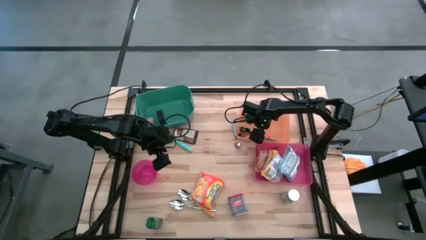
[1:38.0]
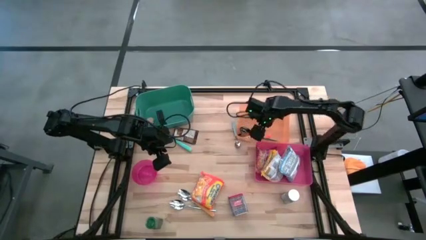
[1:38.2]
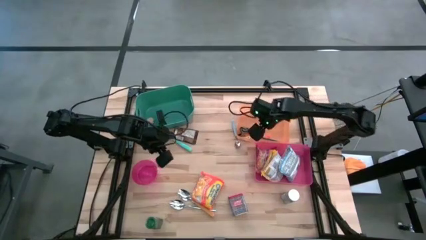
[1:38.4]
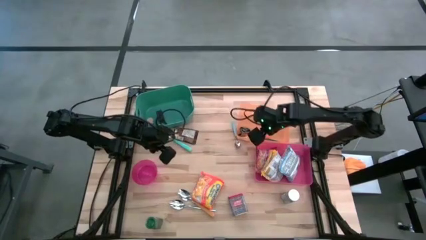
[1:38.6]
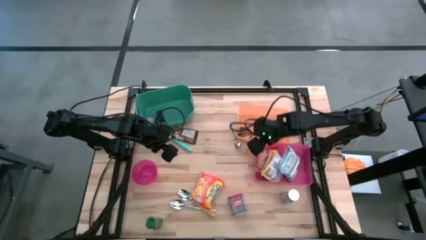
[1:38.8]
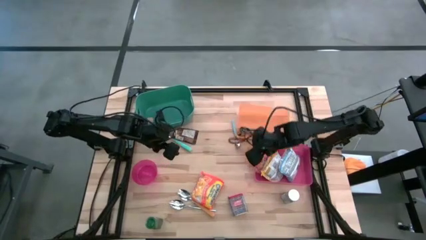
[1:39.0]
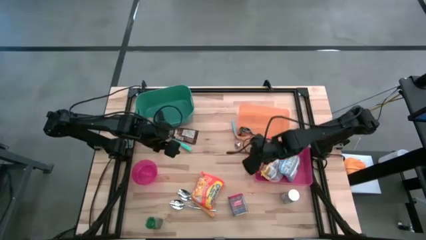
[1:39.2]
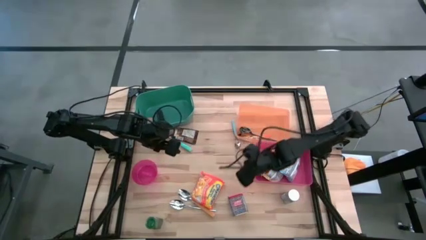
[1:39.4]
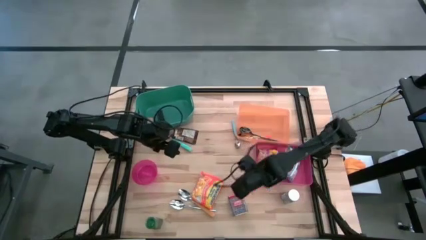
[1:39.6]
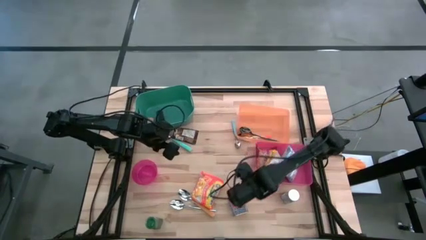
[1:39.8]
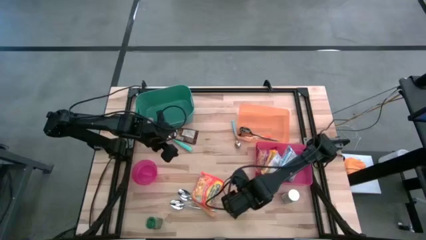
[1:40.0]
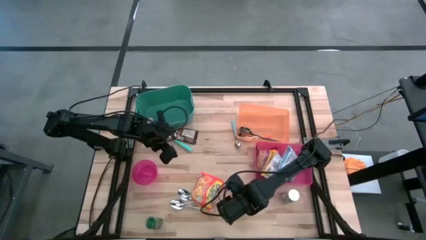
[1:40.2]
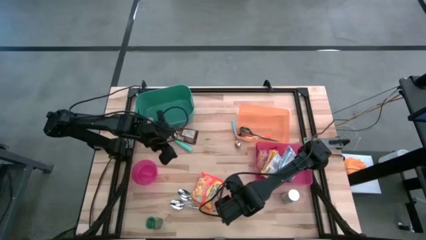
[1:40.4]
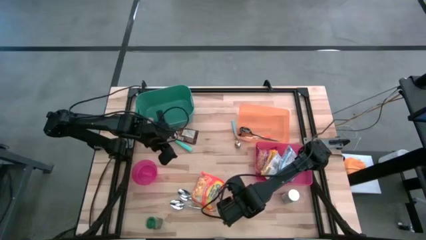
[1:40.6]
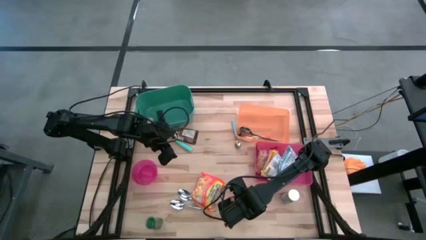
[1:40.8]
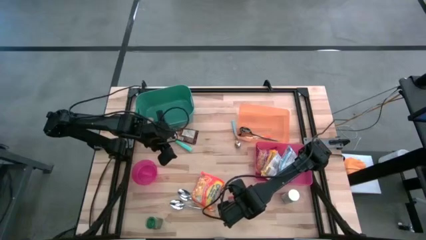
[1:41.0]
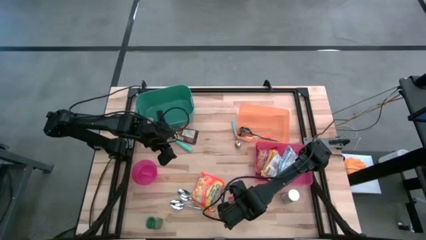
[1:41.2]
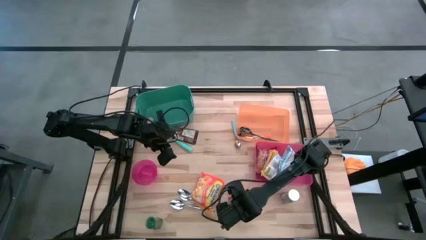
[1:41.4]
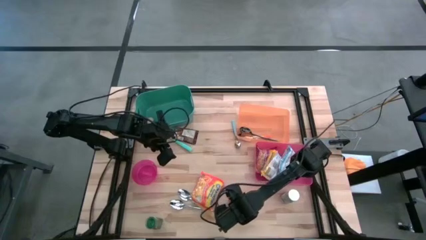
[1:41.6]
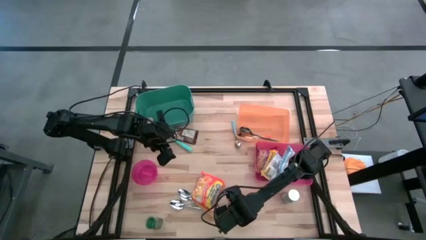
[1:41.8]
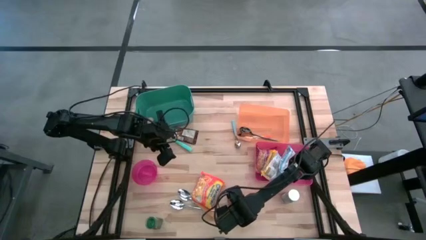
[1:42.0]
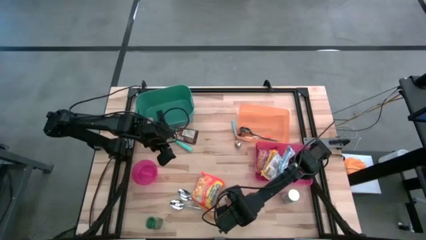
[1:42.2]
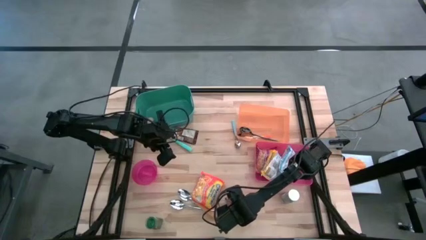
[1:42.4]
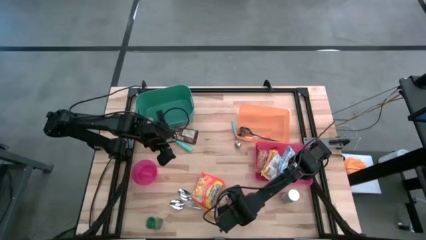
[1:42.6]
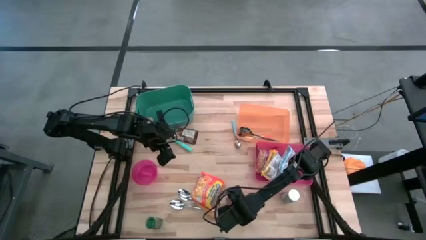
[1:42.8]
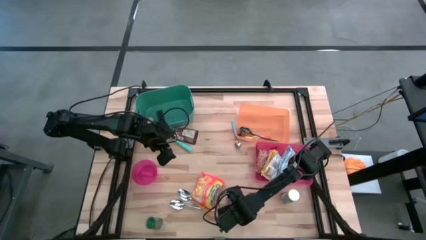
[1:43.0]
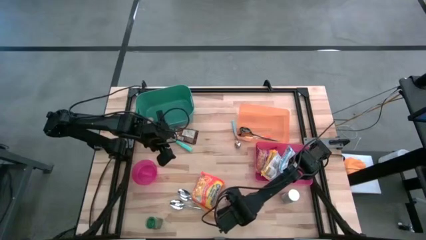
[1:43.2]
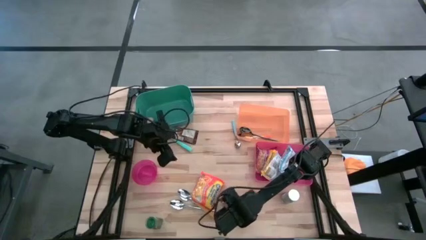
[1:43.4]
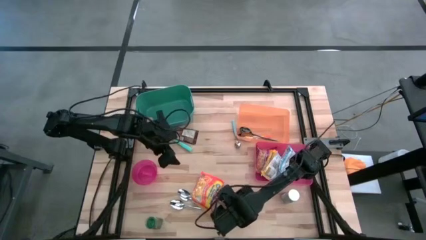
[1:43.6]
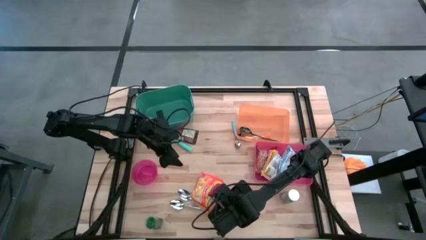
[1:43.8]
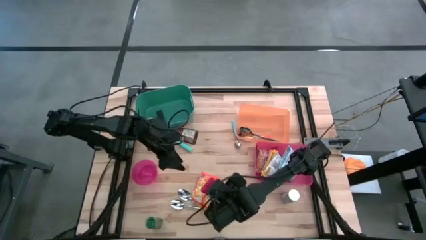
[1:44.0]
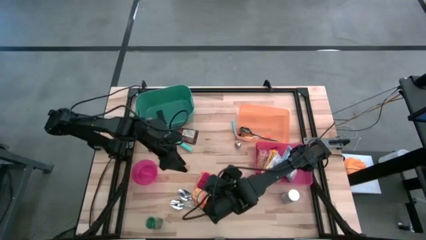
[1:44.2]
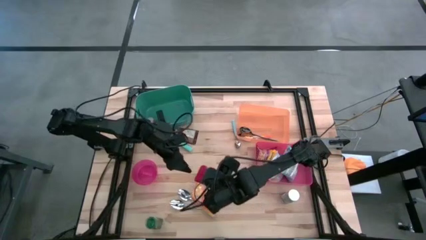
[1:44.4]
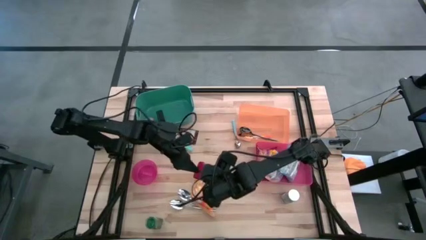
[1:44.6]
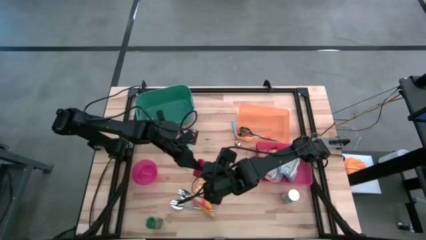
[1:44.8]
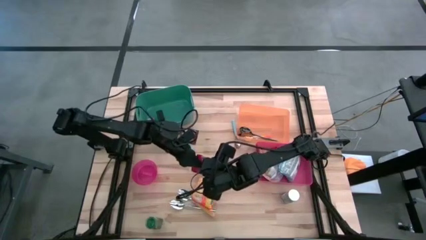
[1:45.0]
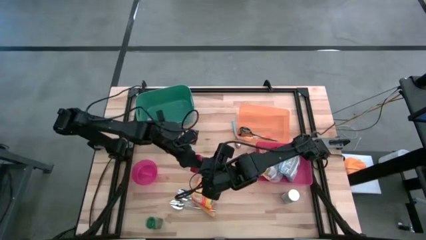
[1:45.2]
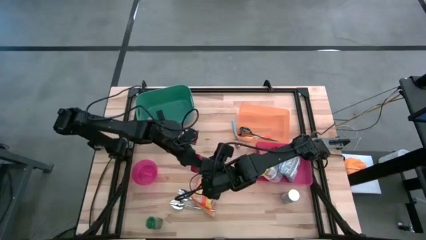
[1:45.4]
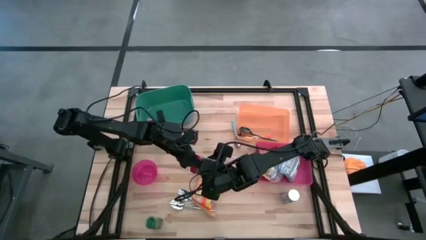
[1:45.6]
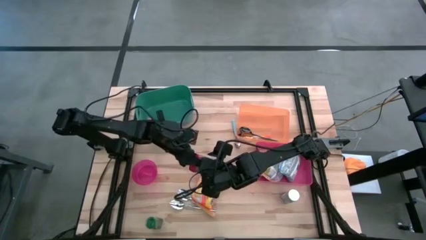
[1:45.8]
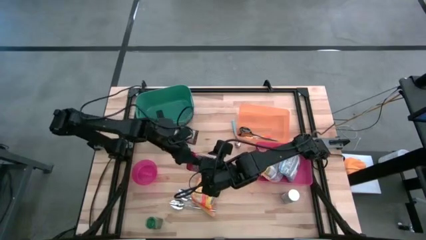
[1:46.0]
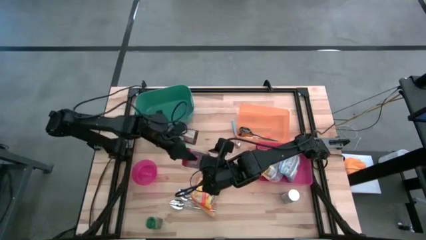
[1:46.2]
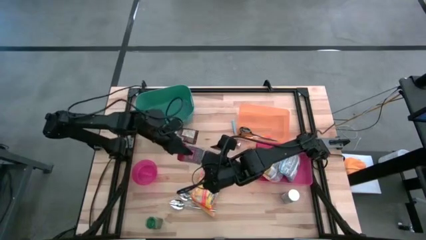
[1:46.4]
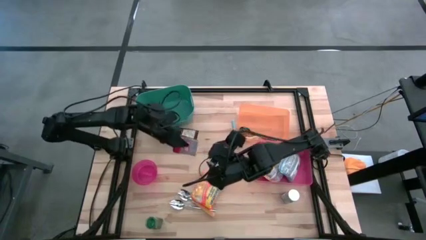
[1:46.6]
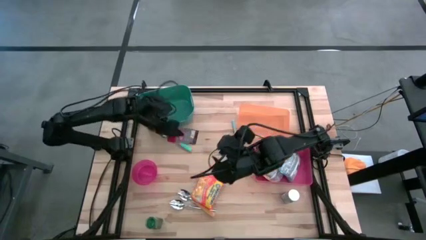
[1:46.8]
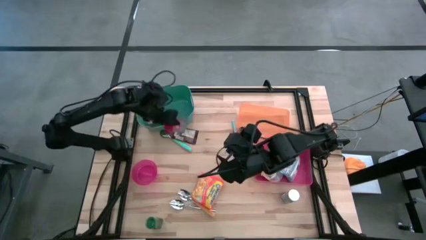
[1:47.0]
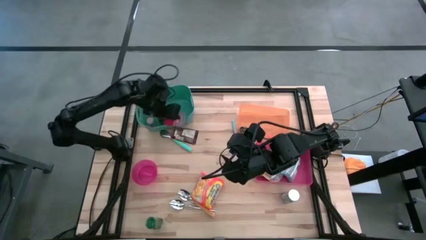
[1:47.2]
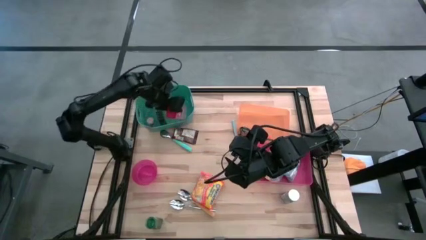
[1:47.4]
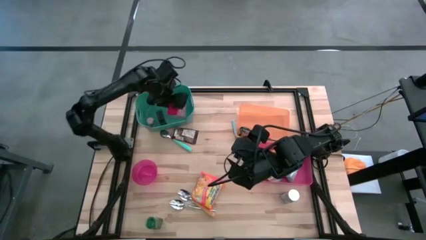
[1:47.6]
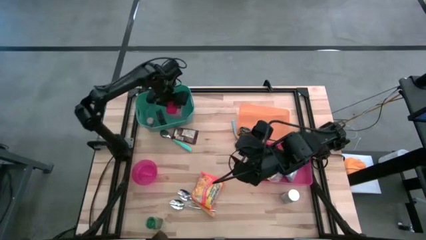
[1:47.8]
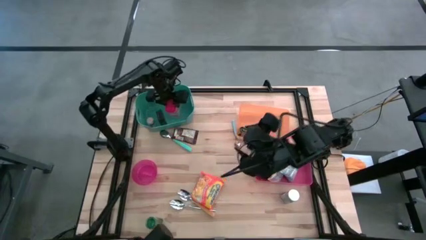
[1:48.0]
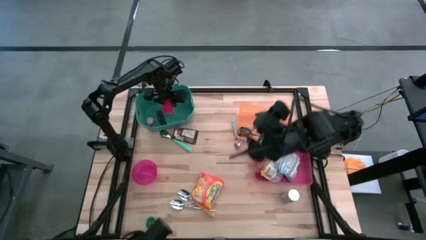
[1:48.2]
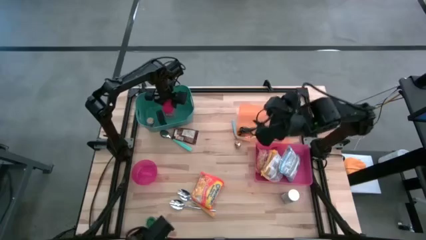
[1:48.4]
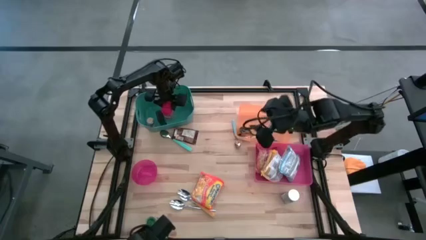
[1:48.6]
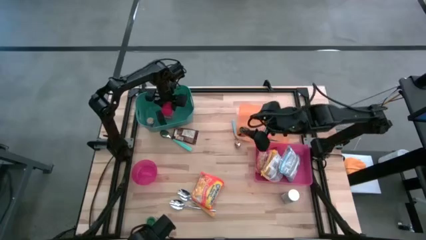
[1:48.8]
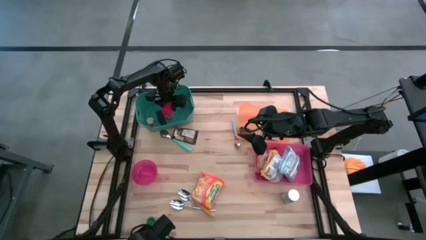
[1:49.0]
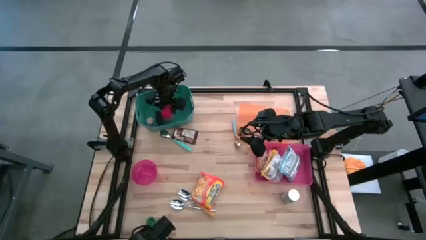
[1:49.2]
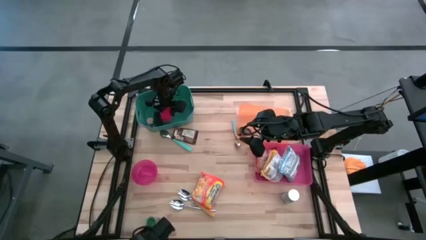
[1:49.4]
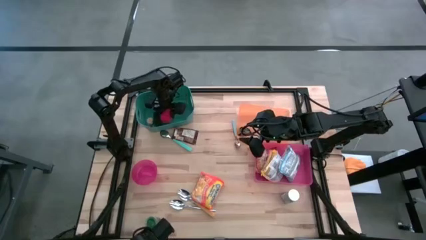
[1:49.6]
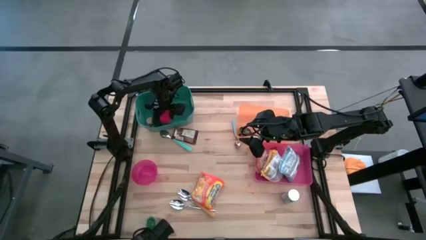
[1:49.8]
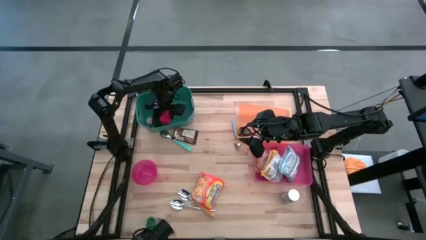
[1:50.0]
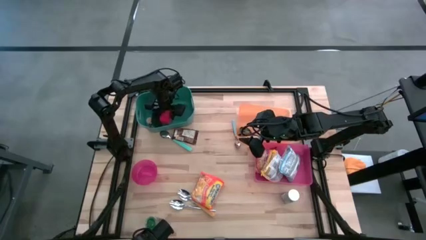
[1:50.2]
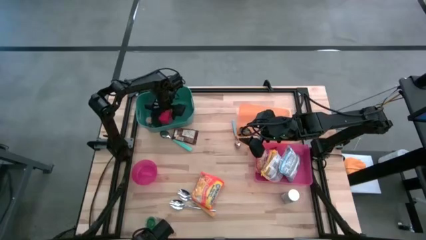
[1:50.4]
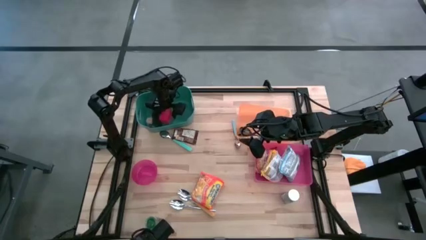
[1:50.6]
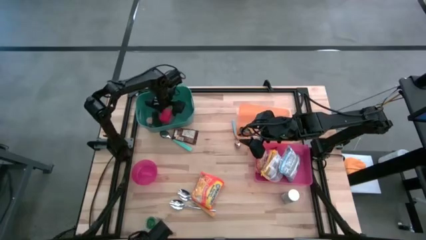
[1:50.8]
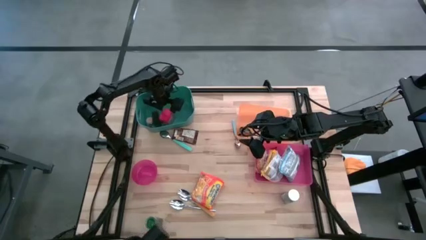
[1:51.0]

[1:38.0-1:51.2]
Put the red paprika seasoning can into the green bin
